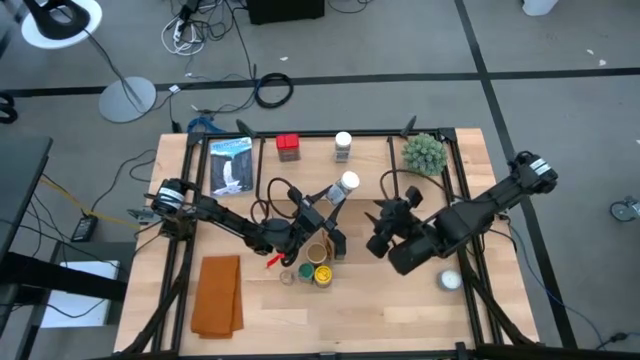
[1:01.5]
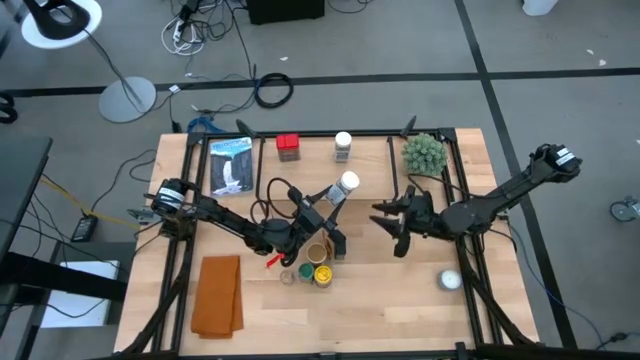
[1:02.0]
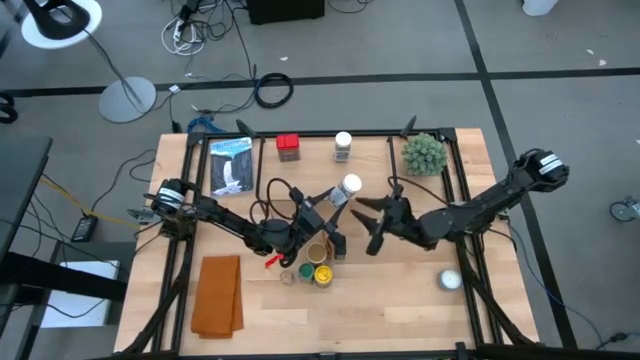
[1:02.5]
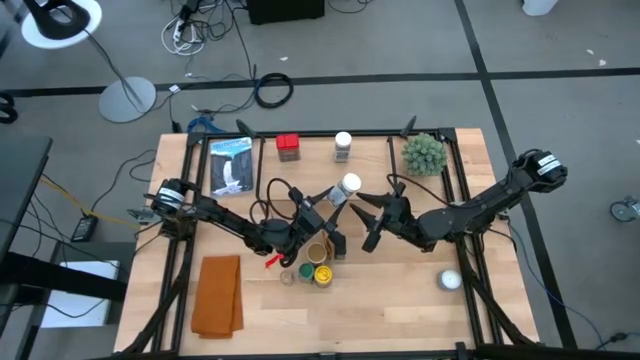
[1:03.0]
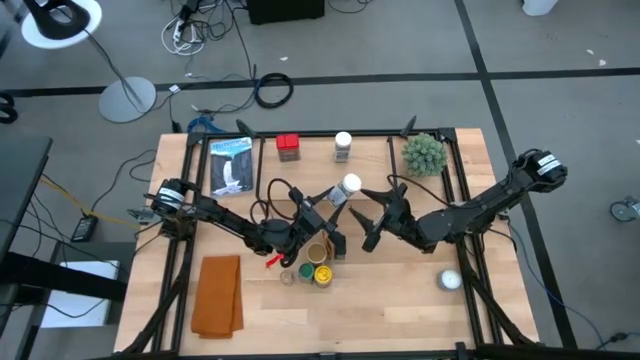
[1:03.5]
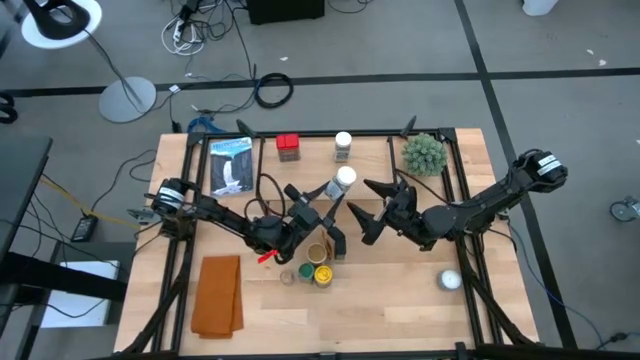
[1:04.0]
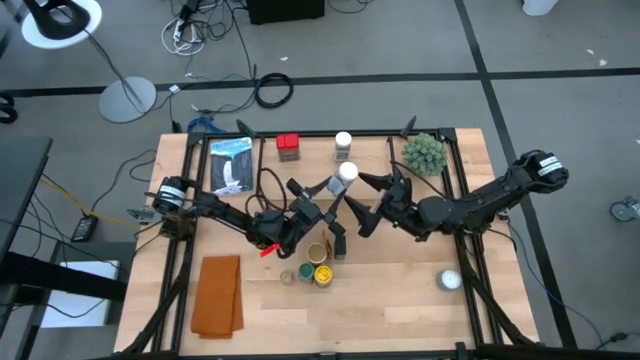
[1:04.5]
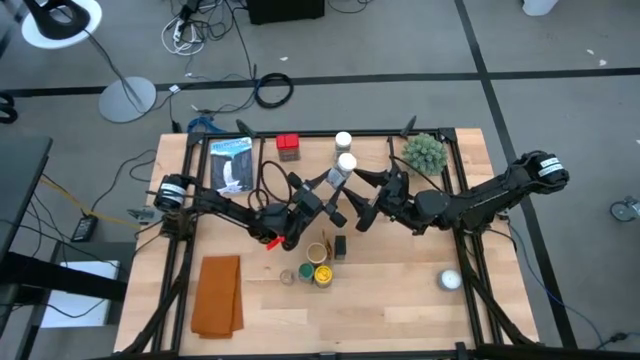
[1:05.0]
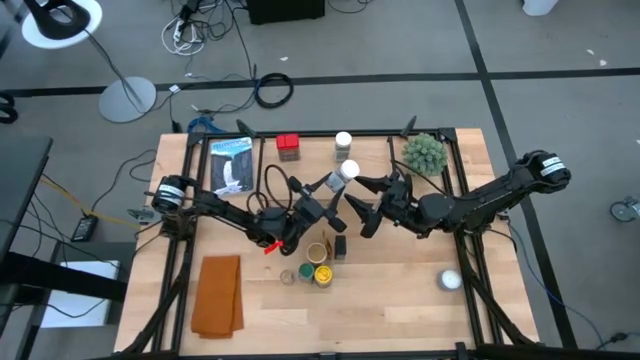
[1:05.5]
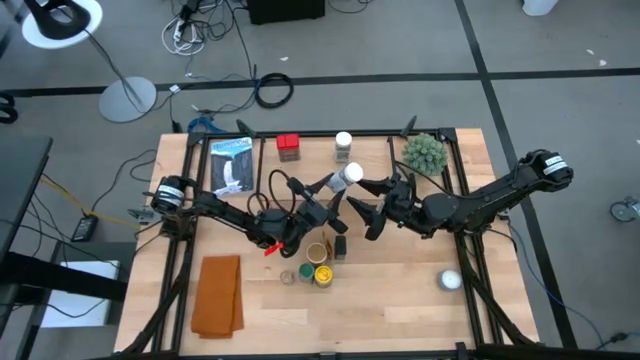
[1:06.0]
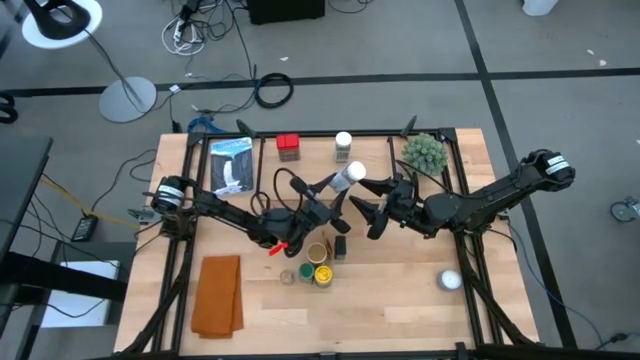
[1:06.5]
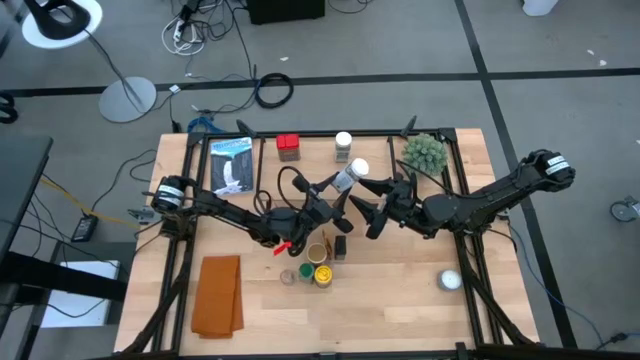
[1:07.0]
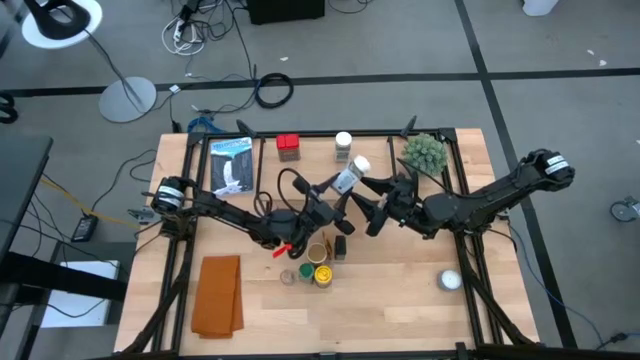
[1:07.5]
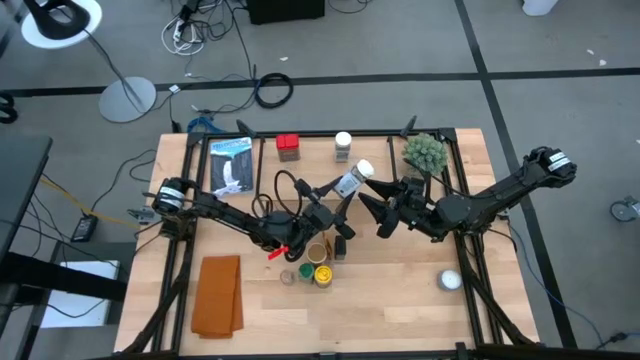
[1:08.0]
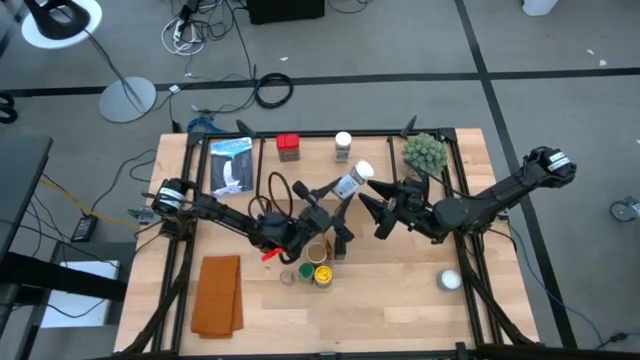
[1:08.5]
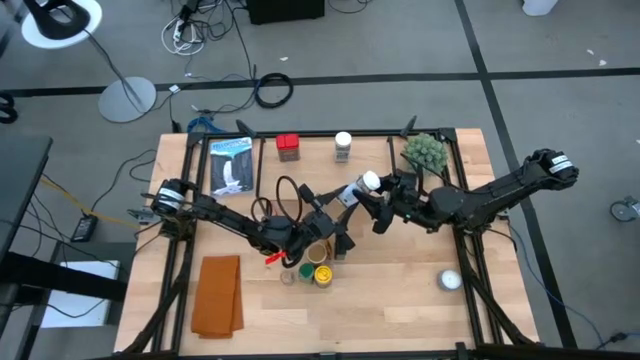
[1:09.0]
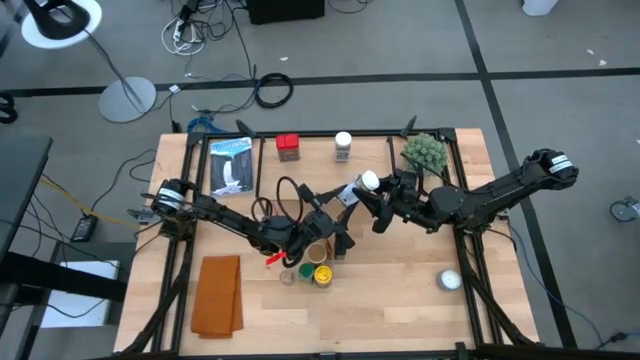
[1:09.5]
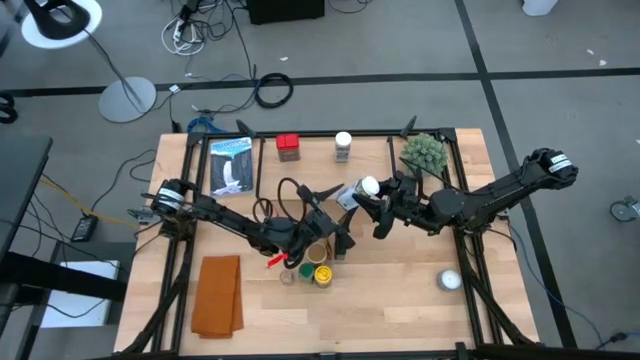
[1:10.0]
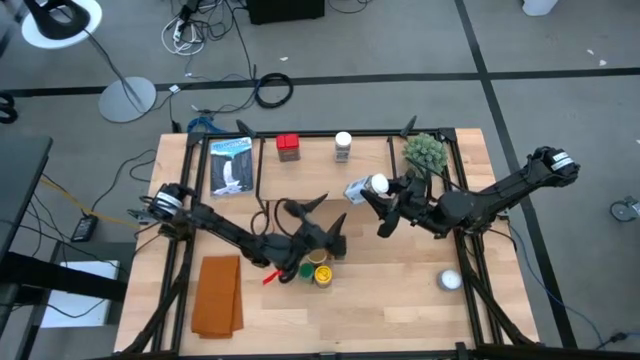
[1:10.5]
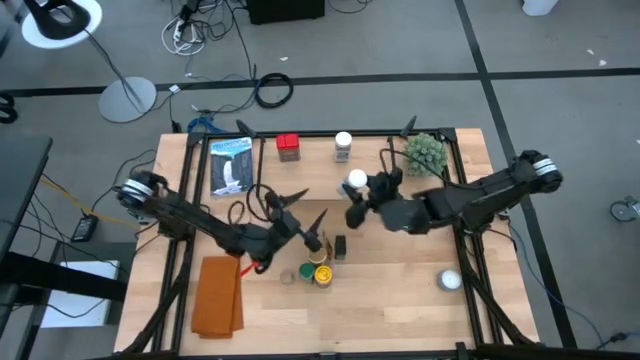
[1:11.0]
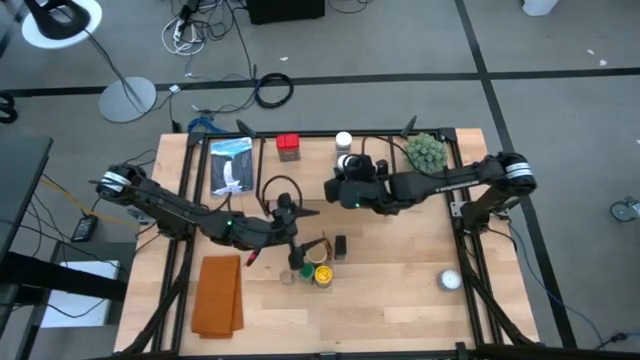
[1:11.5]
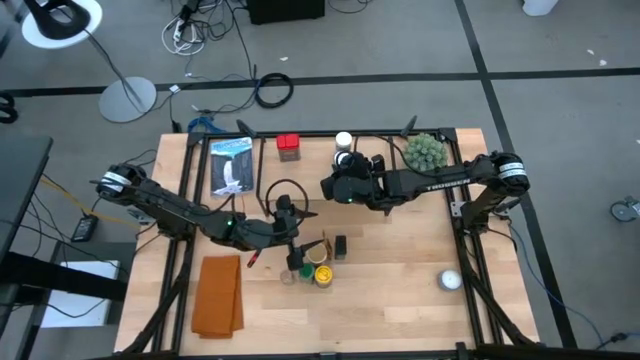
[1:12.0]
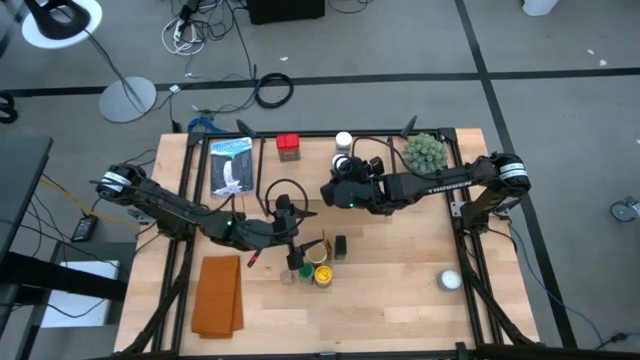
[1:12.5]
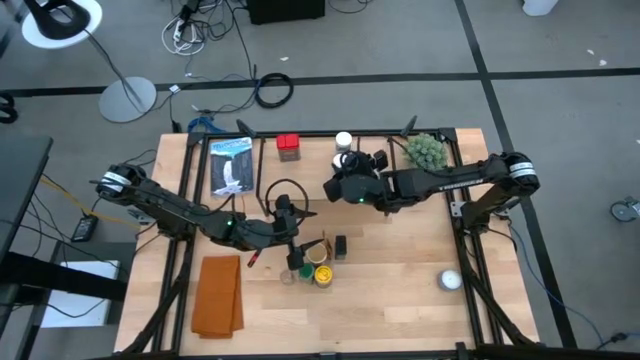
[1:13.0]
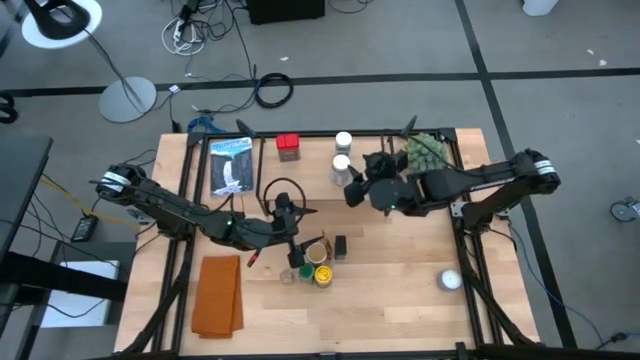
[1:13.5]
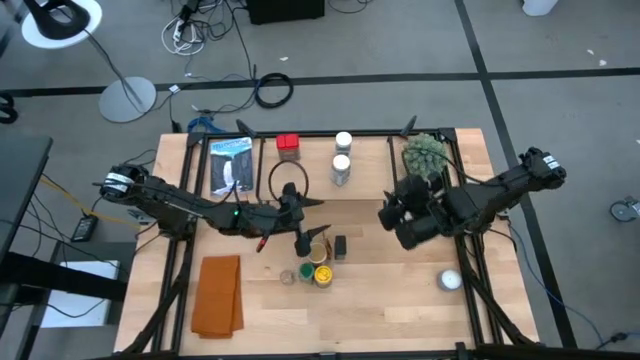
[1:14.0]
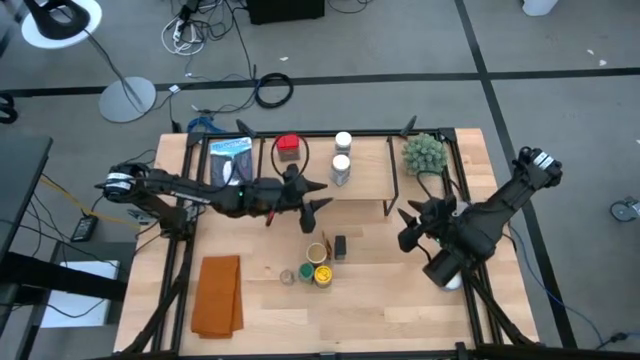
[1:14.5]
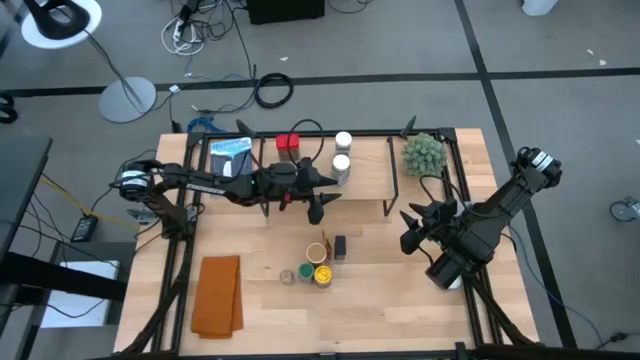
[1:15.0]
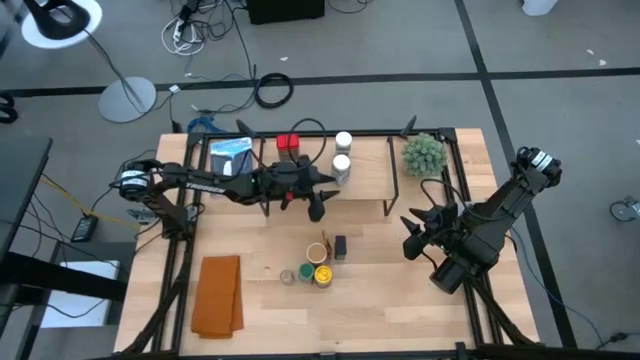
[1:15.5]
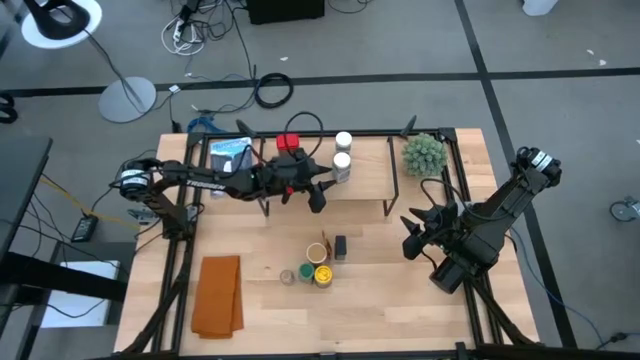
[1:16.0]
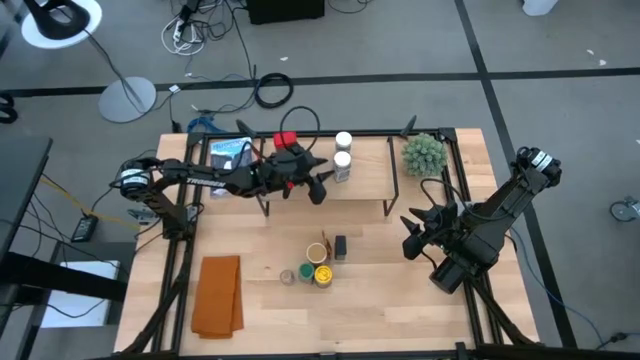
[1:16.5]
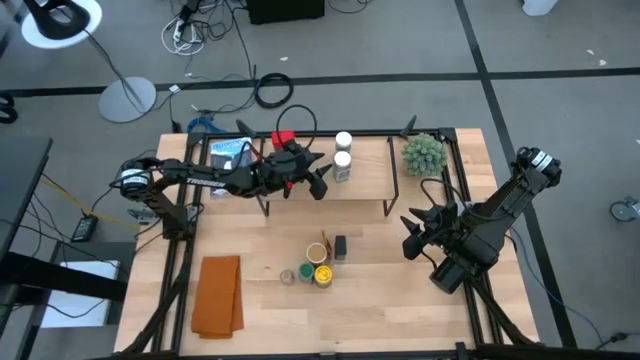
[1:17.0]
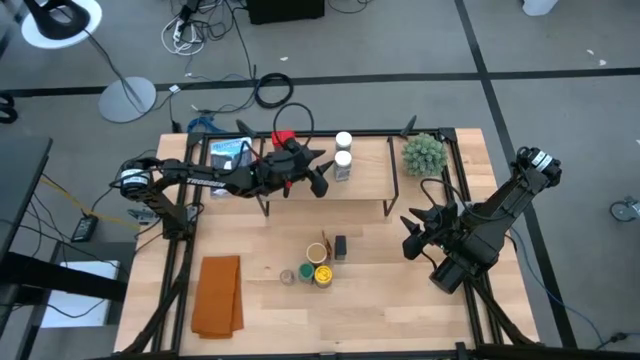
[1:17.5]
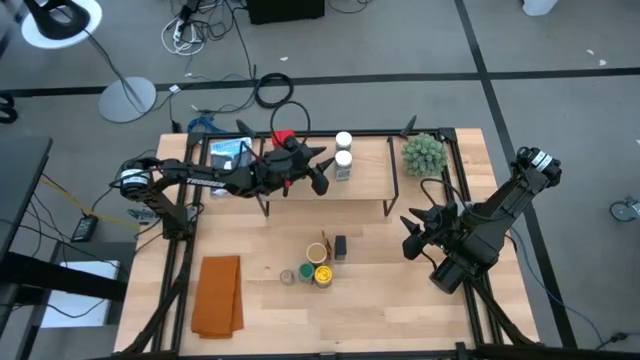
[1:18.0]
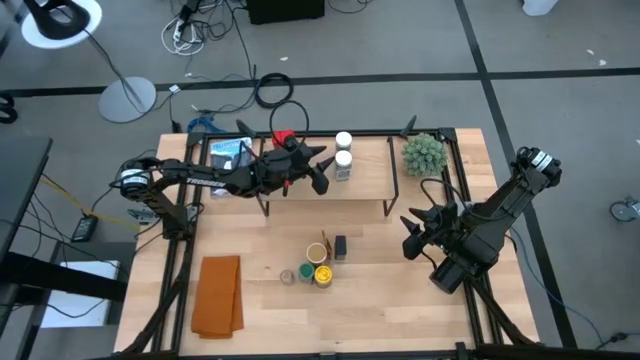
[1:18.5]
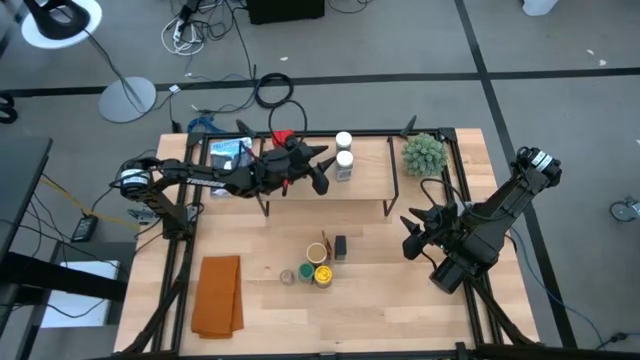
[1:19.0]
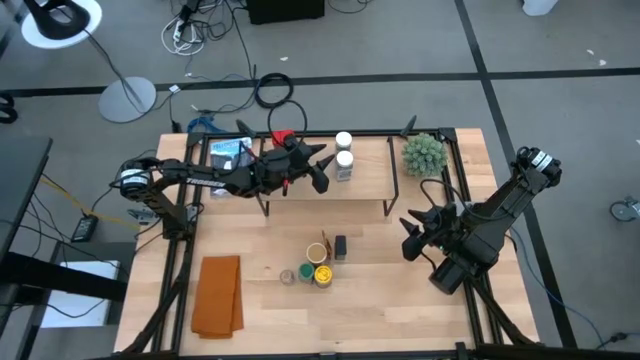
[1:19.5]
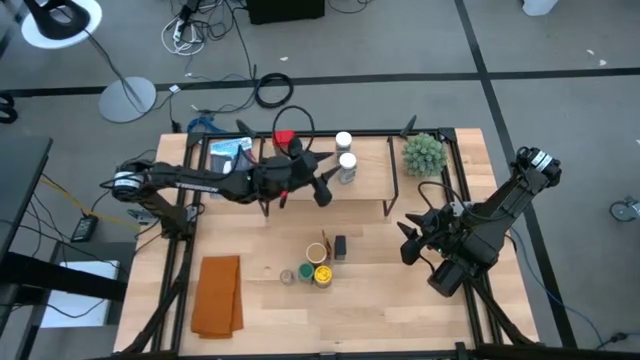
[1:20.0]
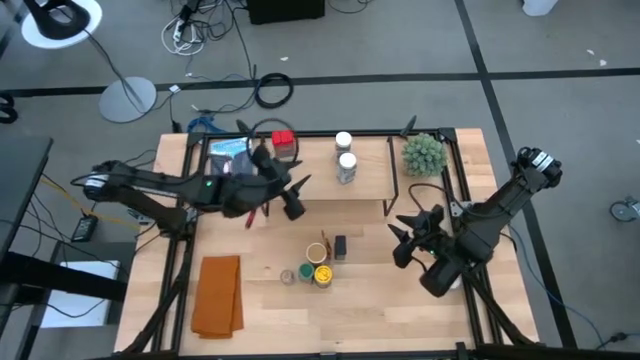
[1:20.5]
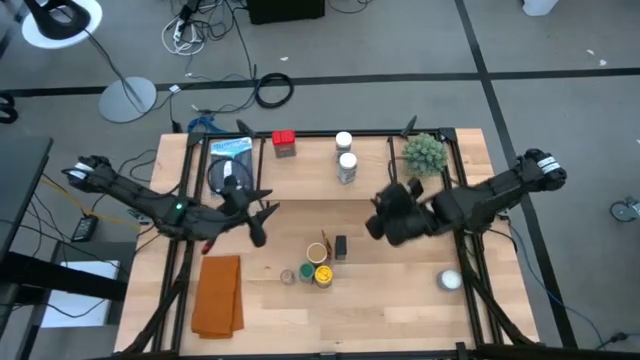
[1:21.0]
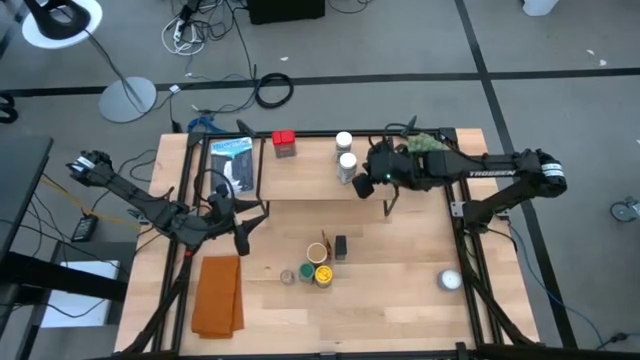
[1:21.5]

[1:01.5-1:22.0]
Task: Shelf spices
Put the white seasoning bottle on the shelf aligned with the other white seasoning bottle
